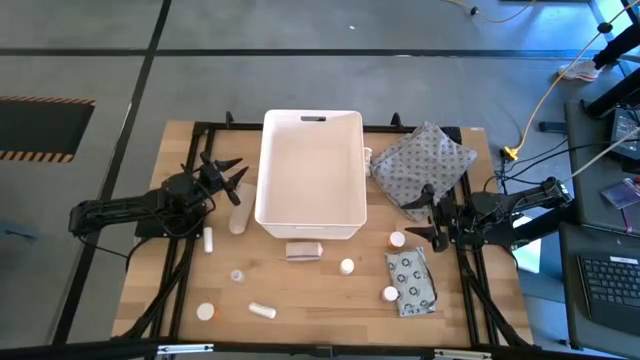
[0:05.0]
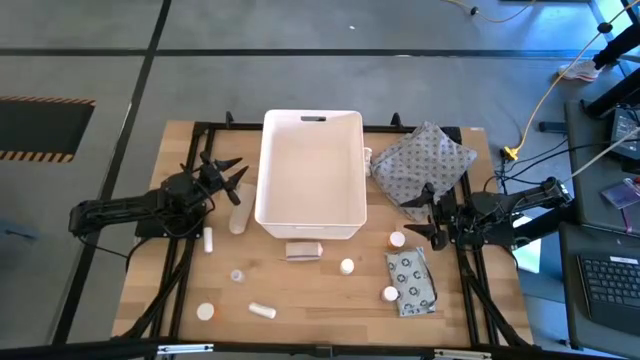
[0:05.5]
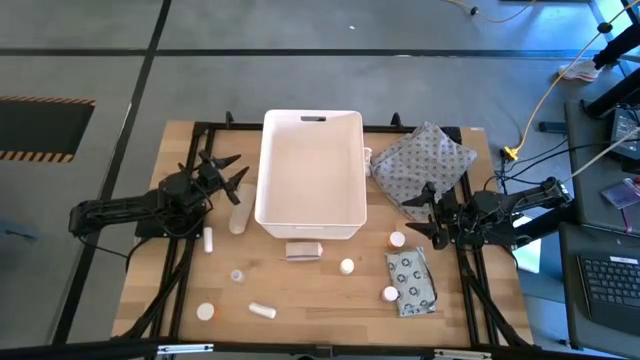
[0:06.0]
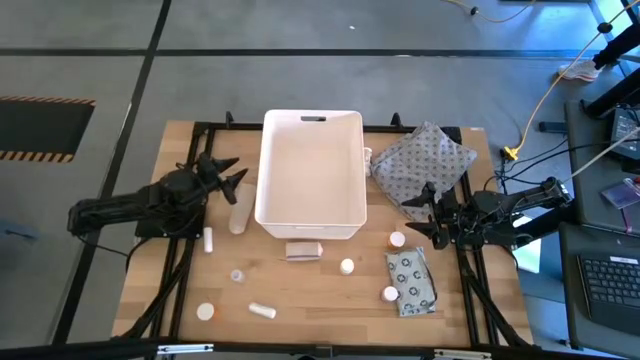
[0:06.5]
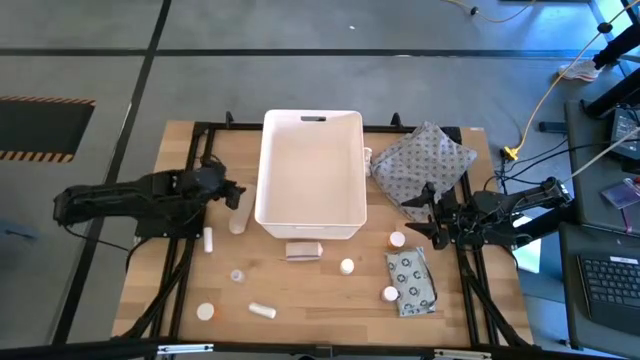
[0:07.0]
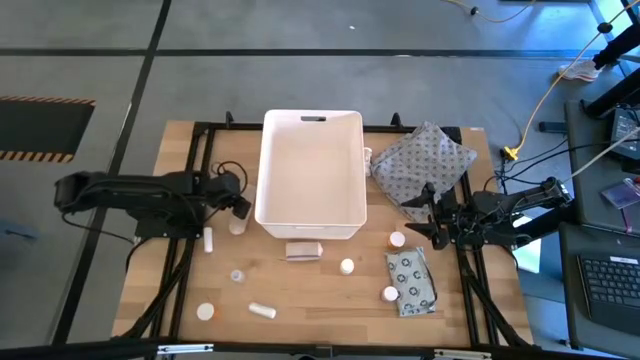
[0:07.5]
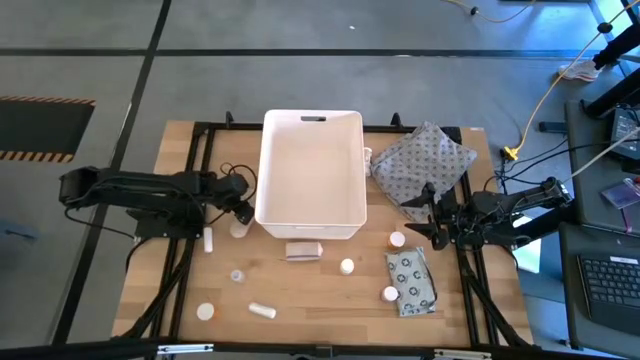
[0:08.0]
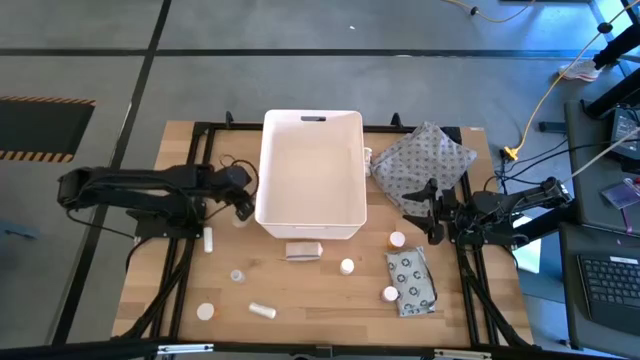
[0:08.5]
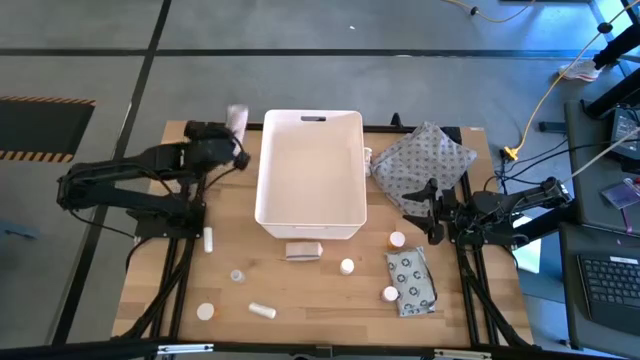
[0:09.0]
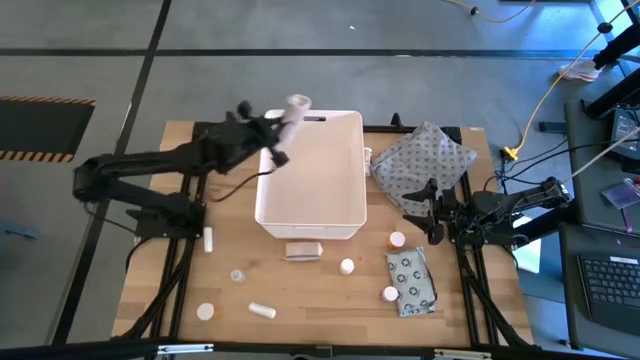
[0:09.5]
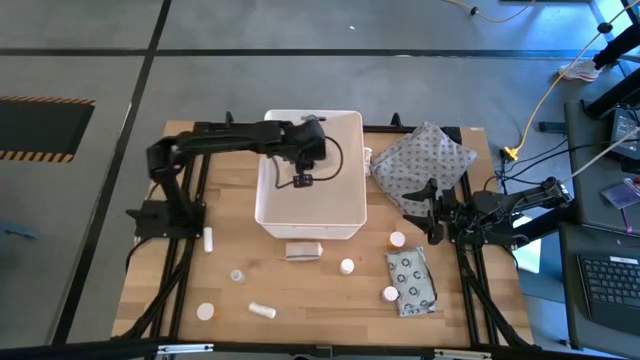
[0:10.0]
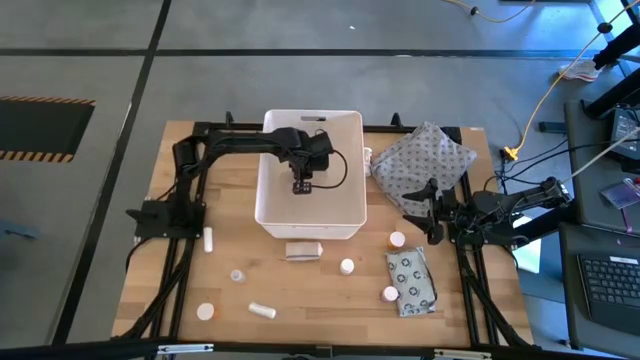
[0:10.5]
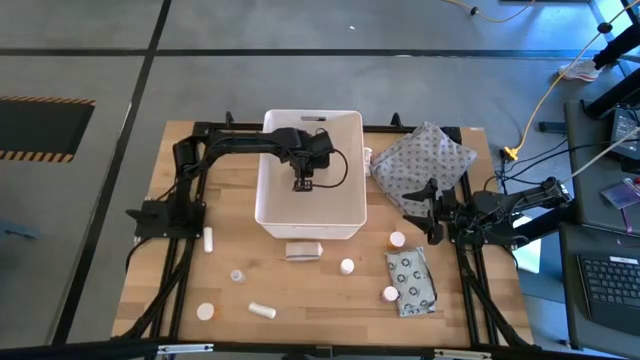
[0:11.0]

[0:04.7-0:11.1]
Task: Pick & place medical supplies in basket/bin
Put the top white bandage into the white bin

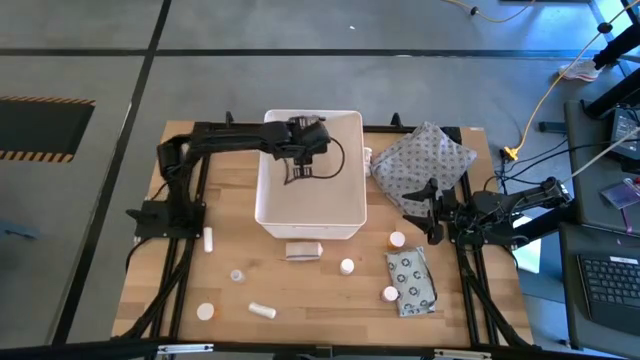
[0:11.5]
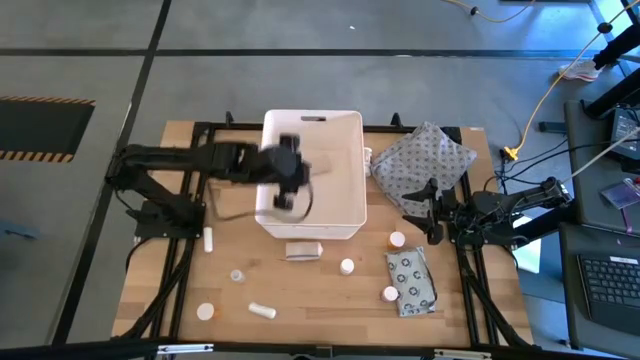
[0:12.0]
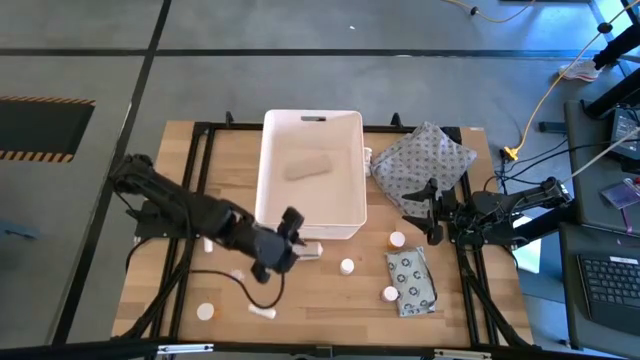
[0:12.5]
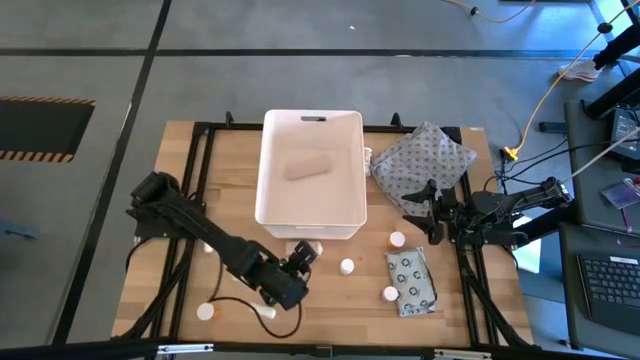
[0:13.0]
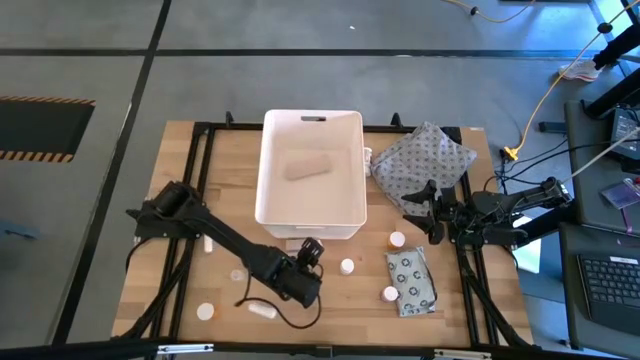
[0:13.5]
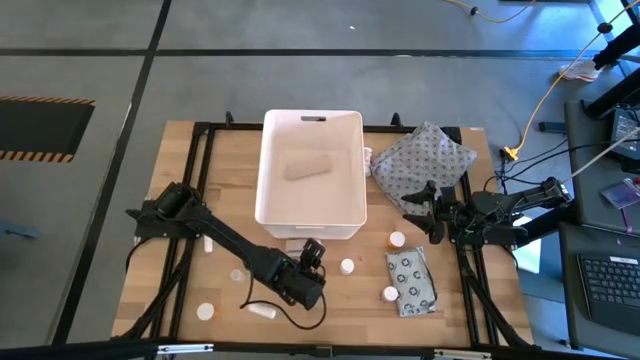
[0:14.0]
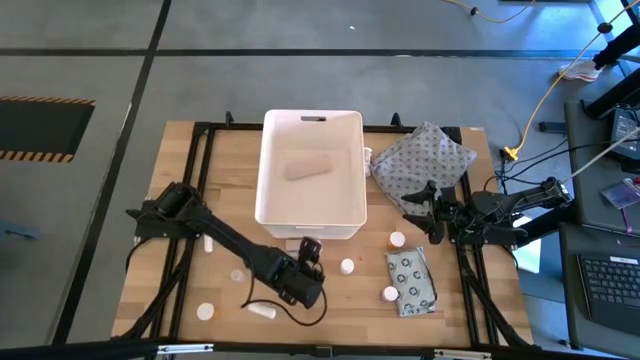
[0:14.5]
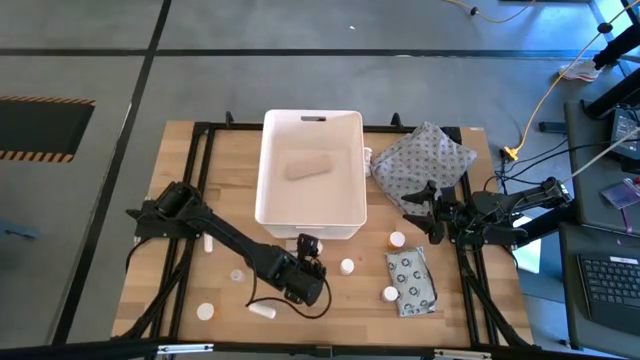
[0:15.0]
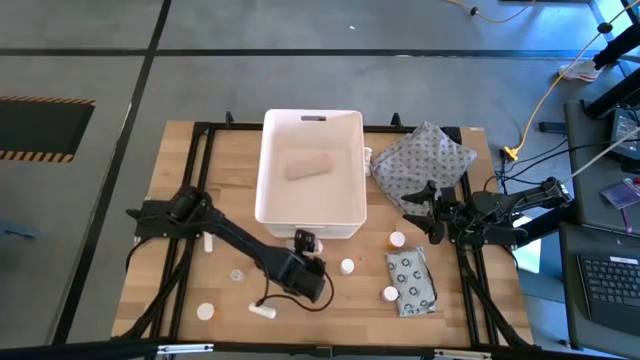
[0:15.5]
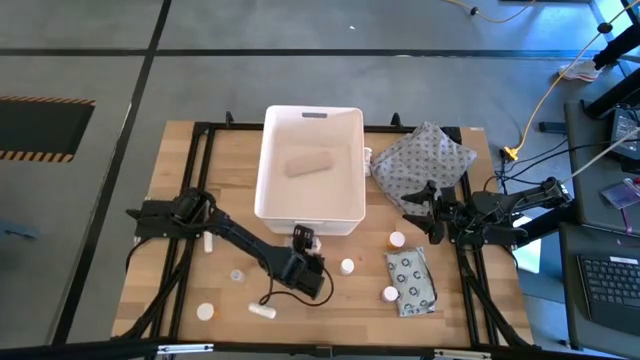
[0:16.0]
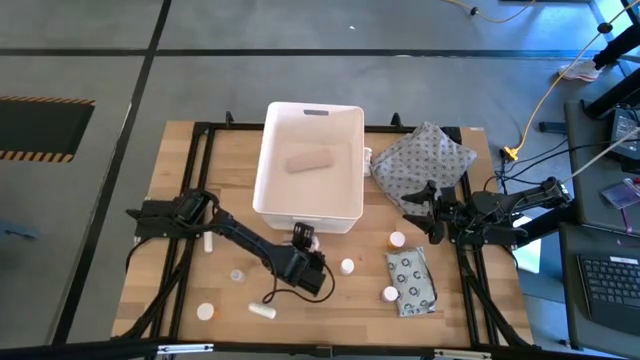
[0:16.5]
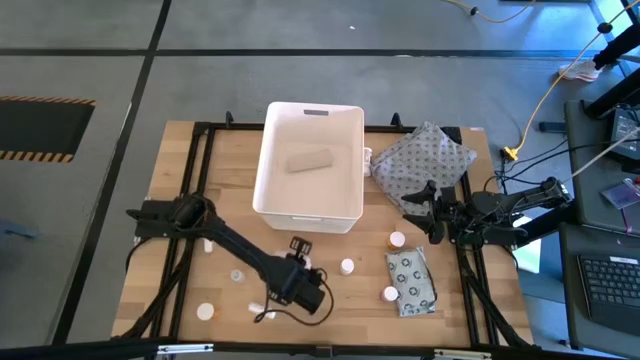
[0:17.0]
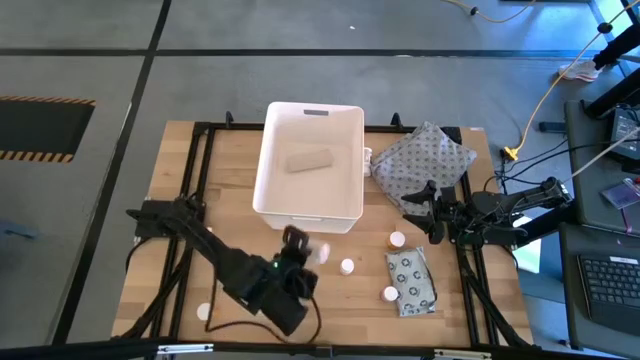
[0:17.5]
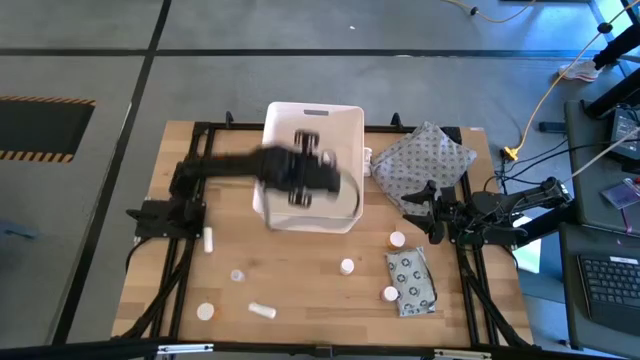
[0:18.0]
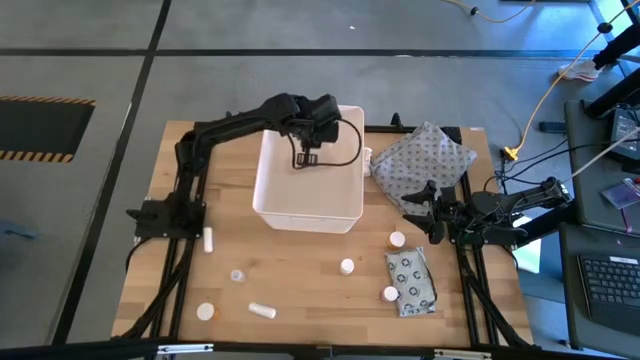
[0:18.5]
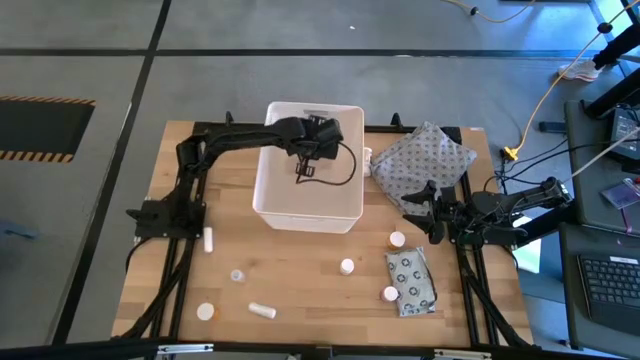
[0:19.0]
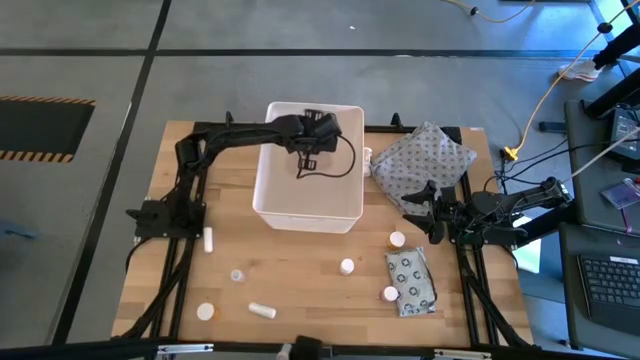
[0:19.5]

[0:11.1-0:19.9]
Put the white bandage into the white bin

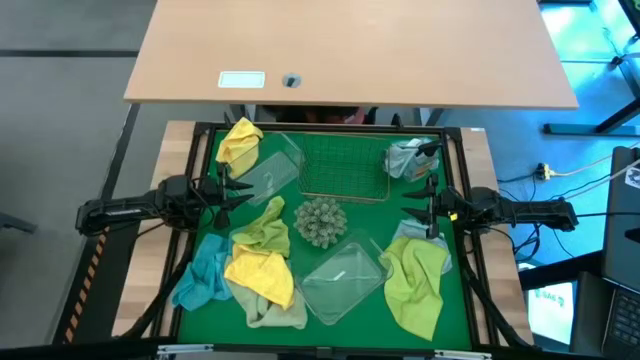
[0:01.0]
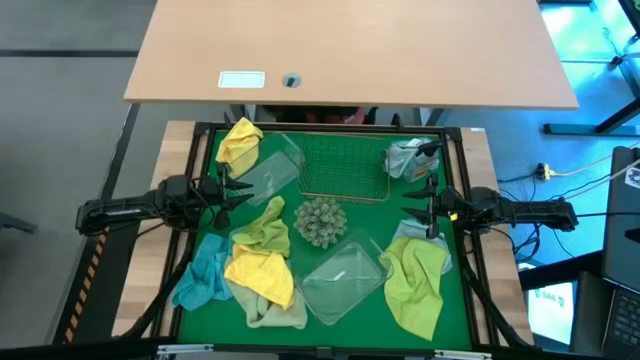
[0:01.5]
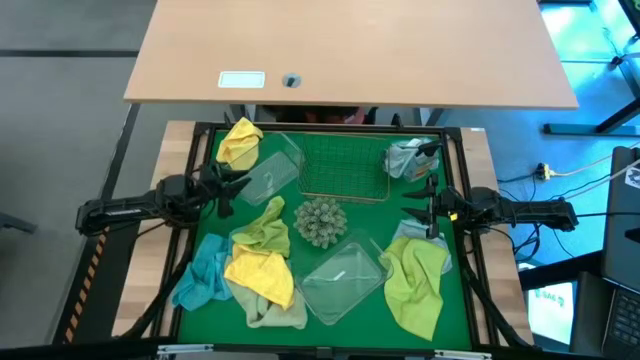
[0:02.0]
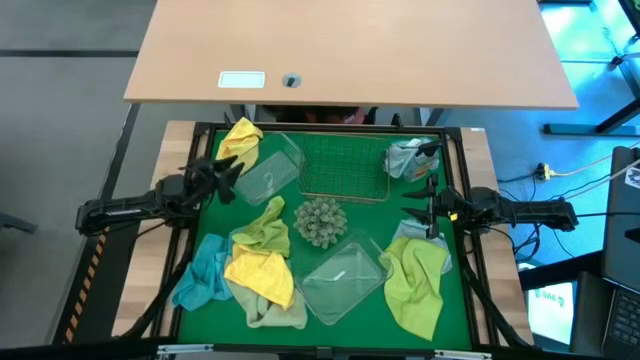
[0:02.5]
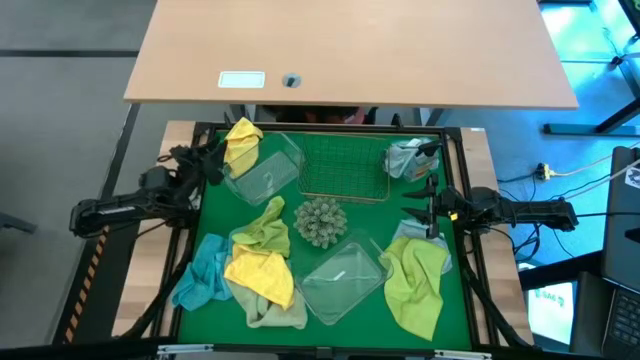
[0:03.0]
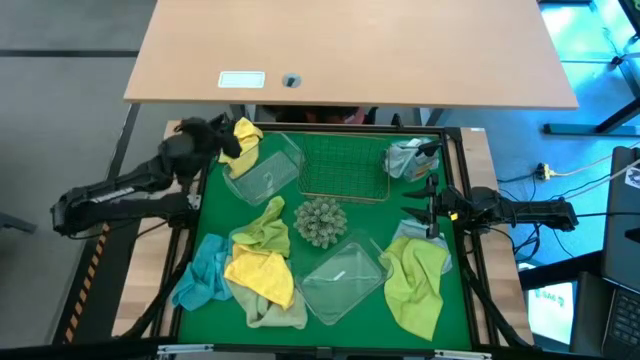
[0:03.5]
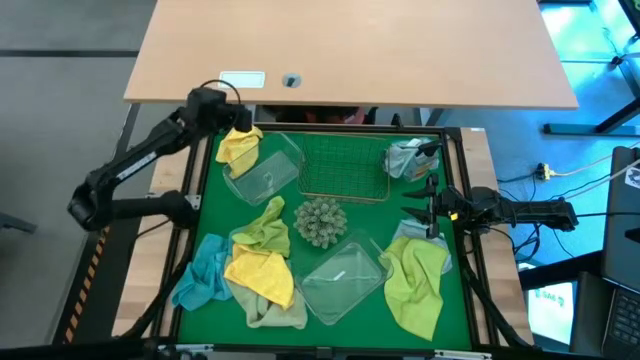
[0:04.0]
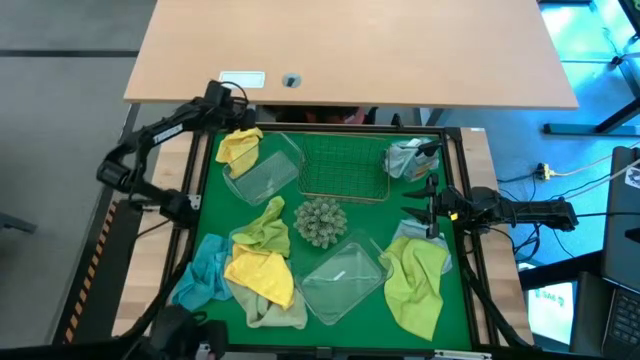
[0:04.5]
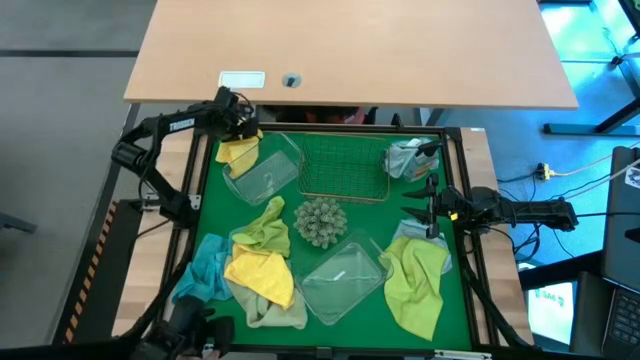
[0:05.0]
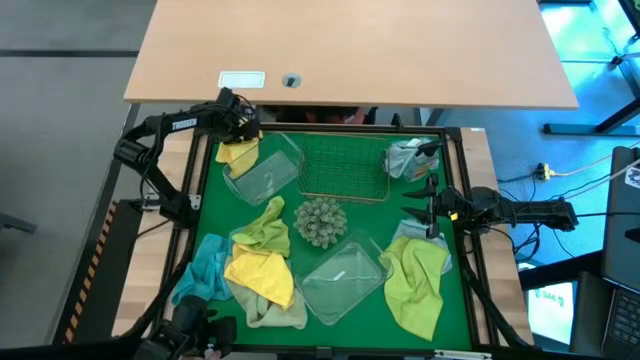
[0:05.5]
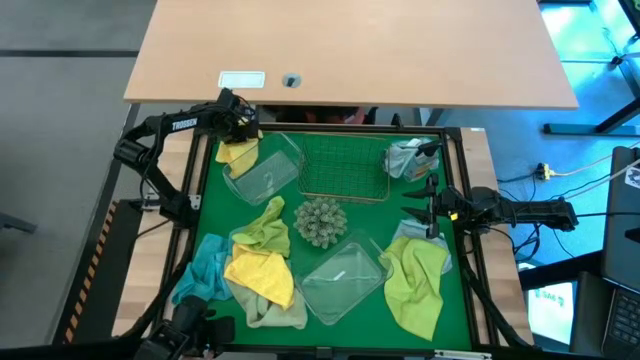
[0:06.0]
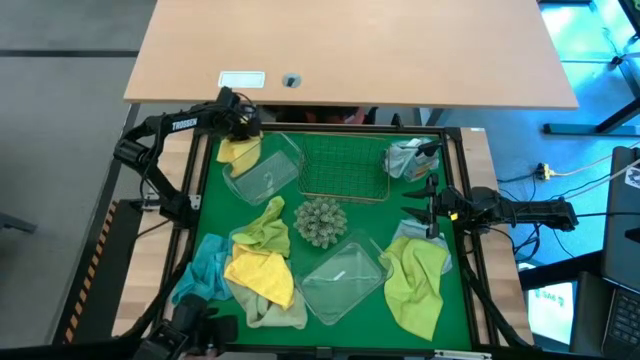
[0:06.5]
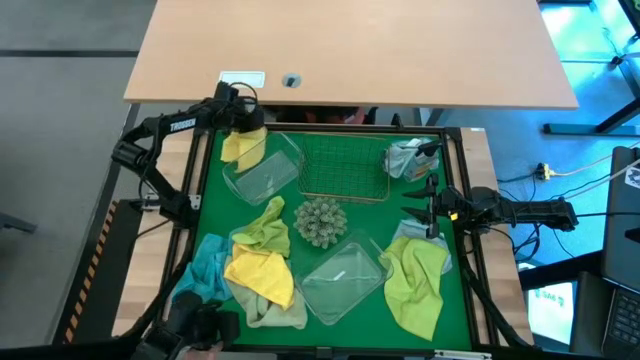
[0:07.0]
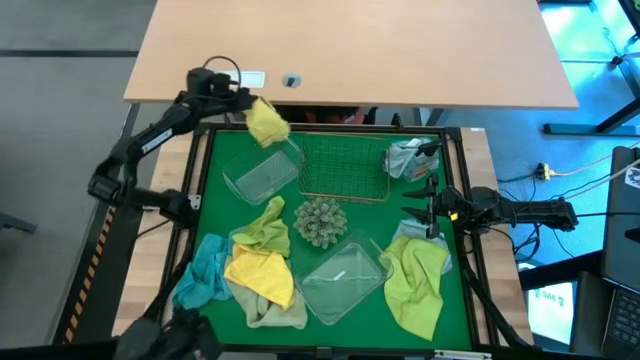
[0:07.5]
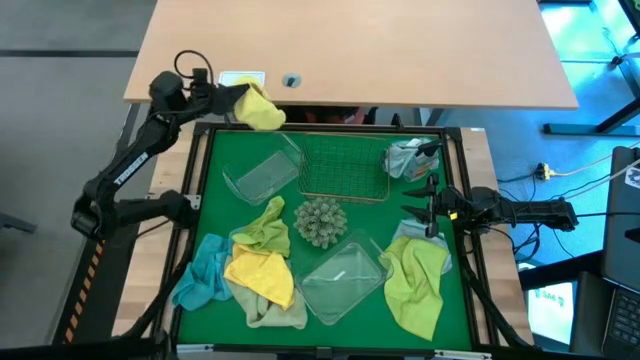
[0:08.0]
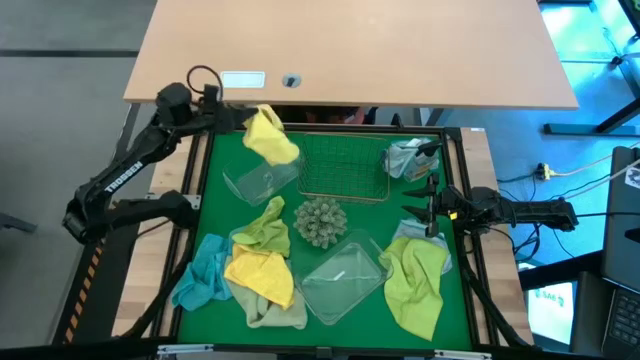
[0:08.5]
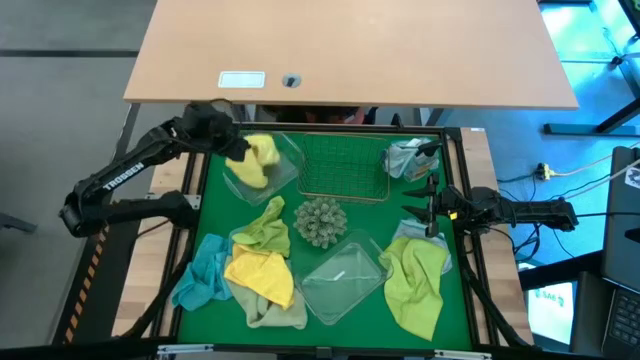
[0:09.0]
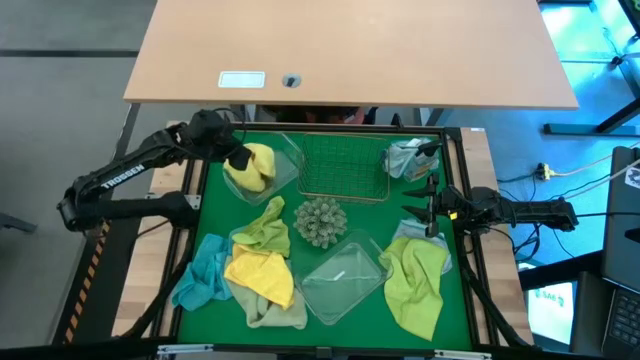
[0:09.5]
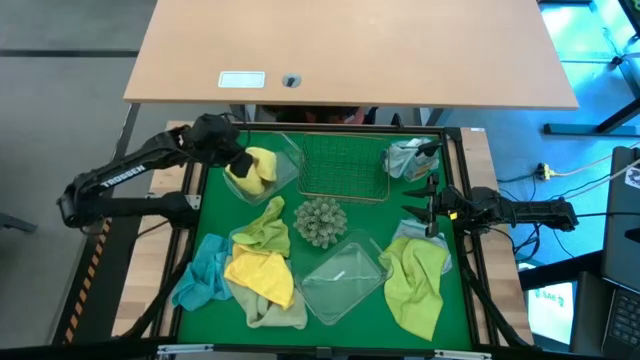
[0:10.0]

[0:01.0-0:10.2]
Task: Sort microfiber towel by color & place in baskets
Put the top yellow microfiber towel into the top transparent bin
